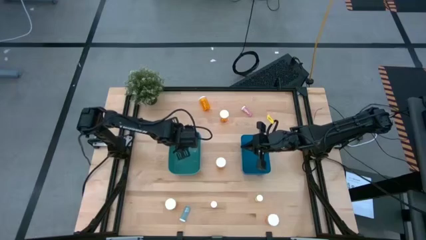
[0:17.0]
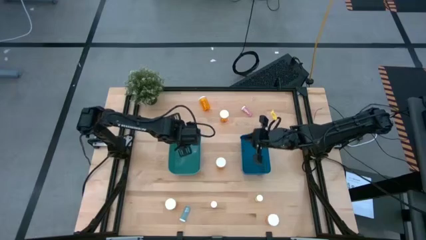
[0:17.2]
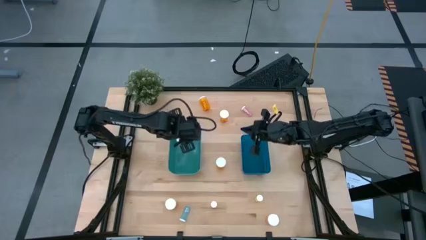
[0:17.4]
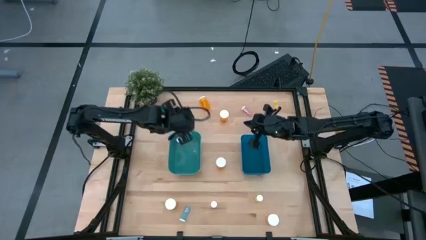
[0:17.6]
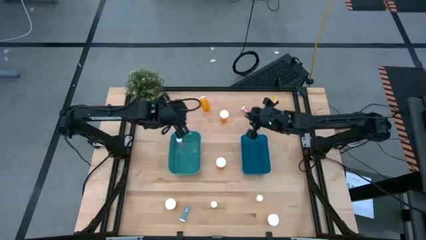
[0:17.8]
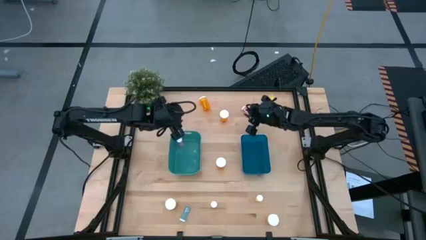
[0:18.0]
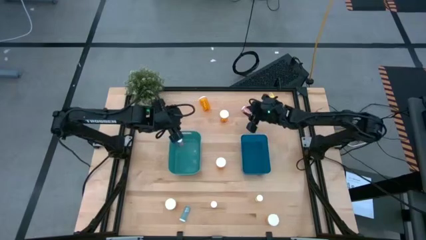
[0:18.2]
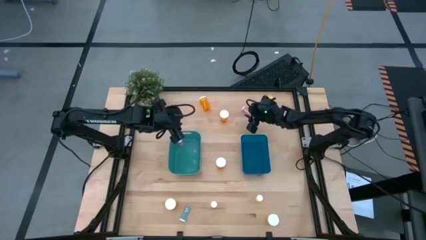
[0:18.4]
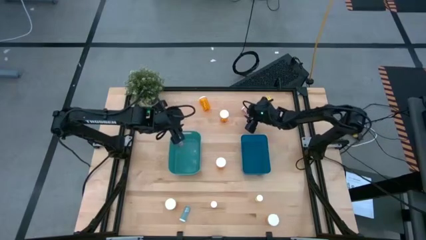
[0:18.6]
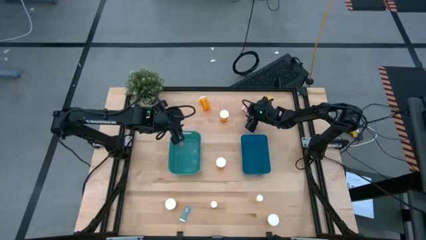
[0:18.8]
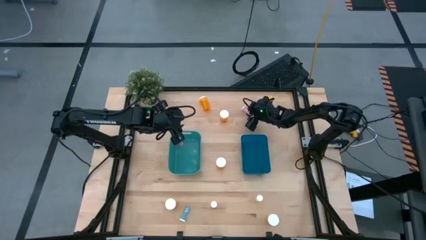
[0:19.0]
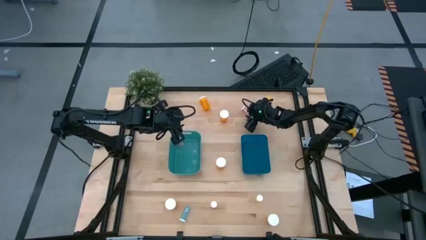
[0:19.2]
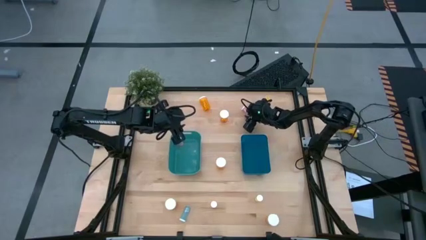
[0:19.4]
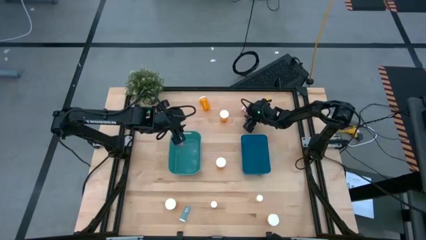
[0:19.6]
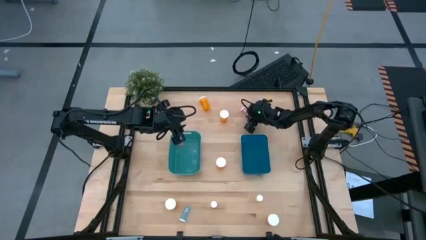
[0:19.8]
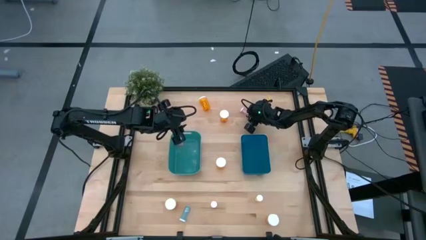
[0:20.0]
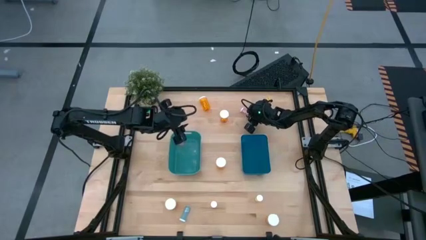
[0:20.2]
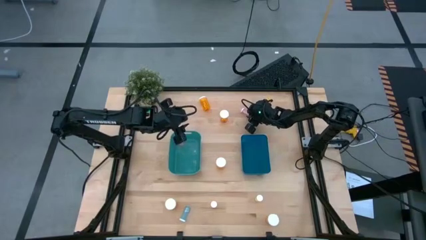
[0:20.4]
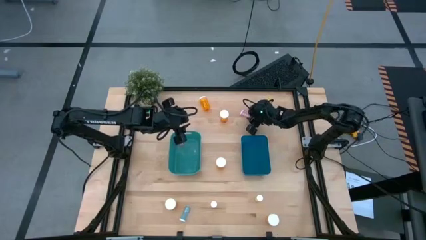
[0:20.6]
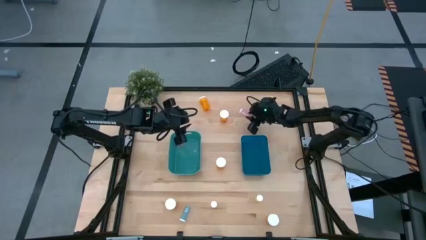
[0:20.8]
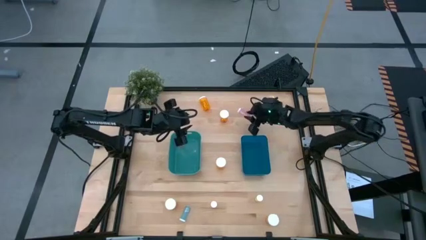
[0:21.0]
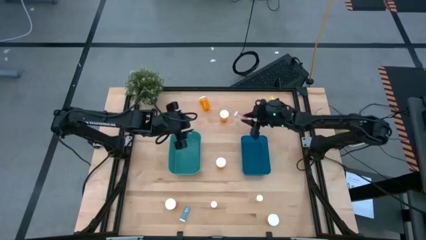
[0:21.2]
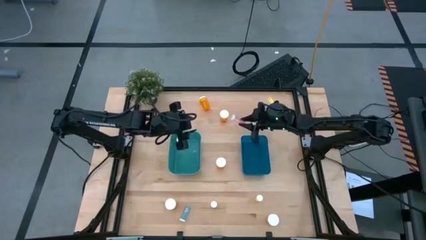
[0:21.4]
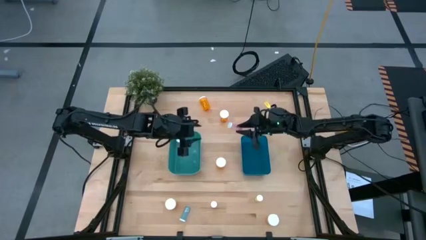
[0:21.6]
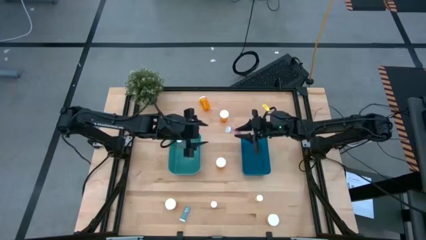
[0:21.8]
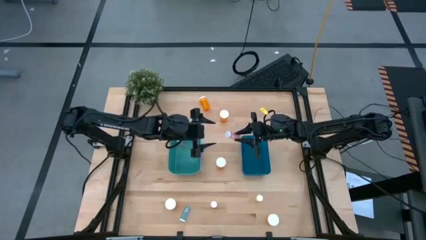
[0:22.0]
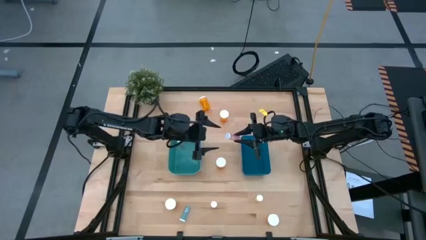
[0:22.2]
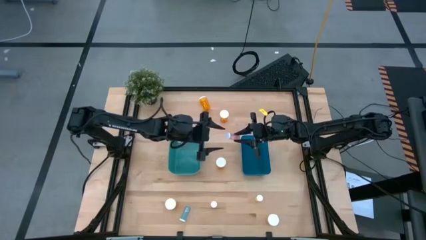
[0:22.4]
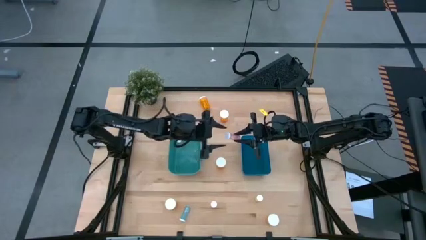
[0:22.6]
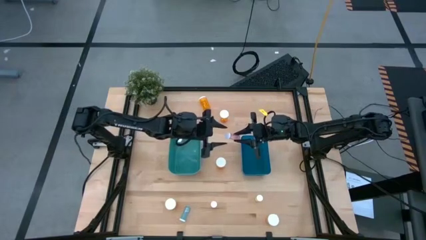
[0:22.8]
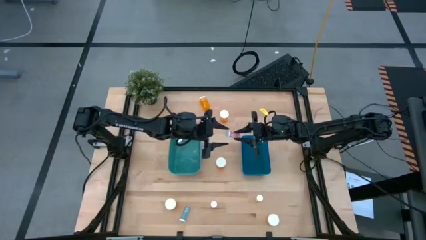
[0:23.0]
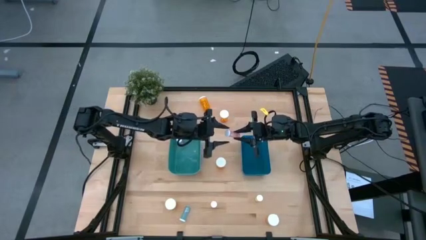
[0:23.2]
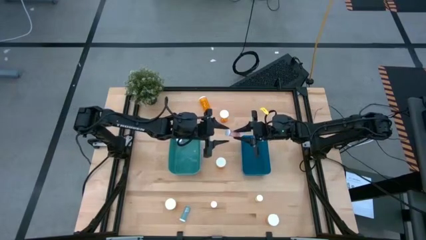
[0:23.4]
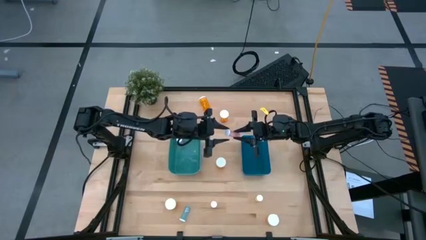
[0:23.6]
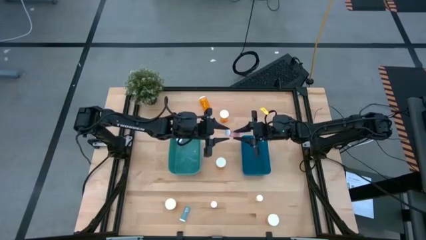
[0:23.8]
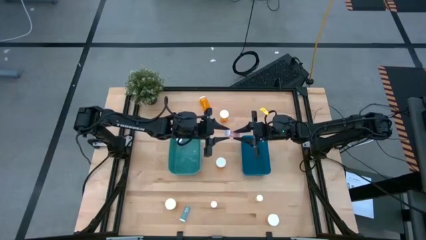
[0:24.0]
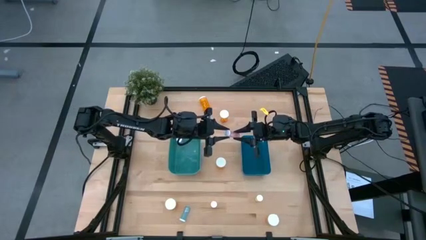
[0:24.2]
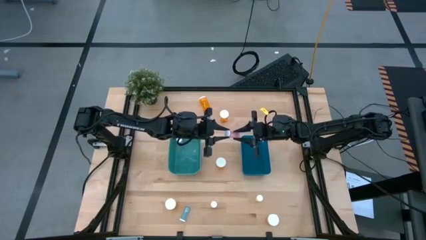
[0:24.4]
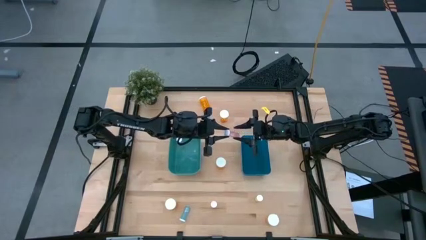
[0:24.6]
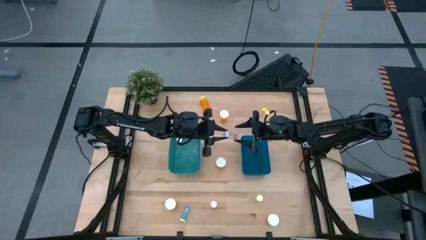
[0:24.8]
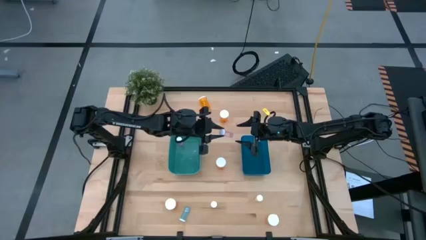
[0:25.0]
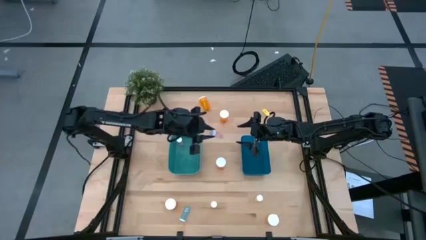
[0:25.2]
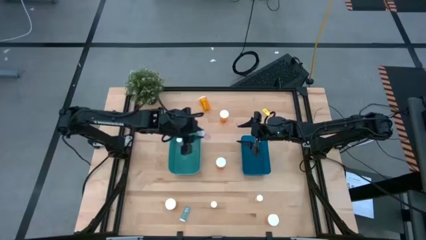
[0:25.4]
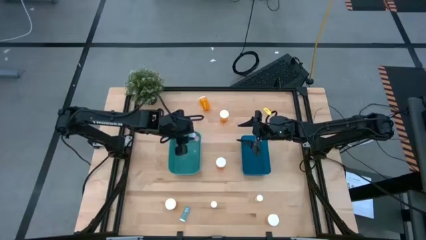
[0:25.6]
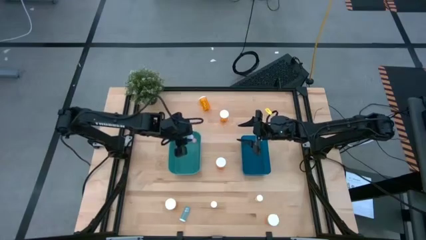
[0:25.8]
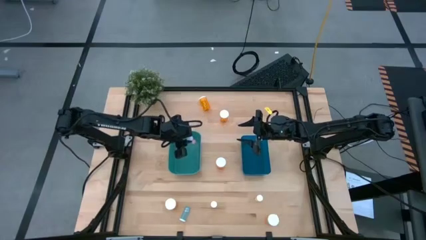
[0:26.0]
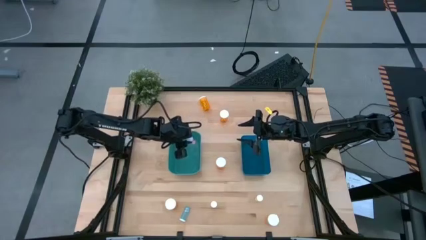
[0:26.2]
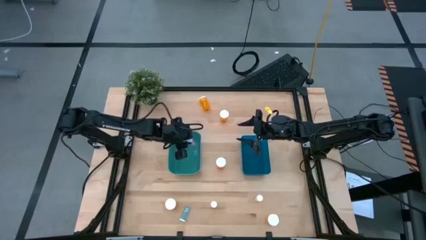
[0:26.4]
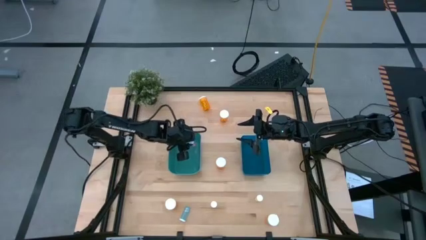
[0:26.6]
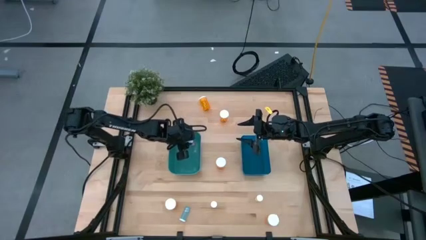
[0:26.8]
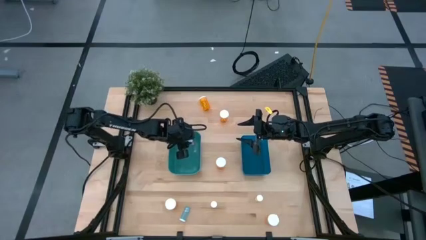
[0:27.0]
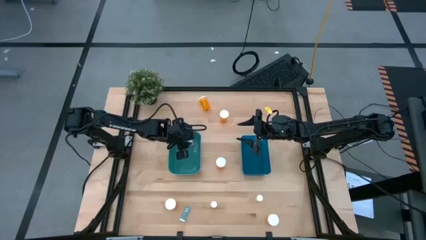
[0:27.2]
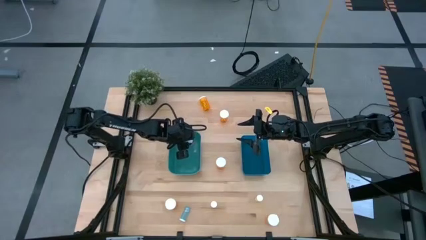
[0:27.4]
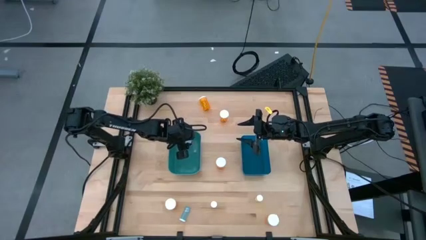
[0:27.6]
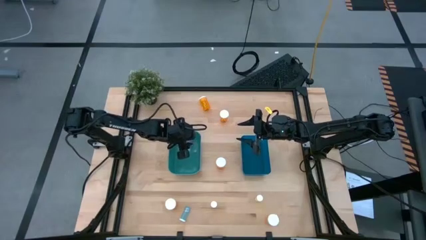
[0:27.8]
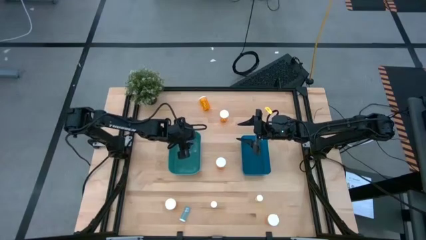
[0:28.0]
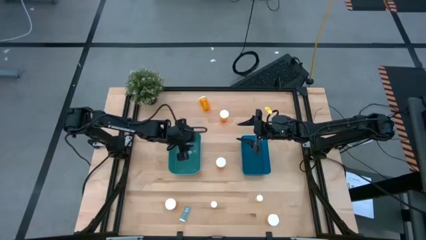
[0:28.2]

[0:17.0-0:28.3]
Task: Pick and place medicine bottles into bin by pill shape (circle, oval)
Put the top right small pink pill bottle into the green bin
